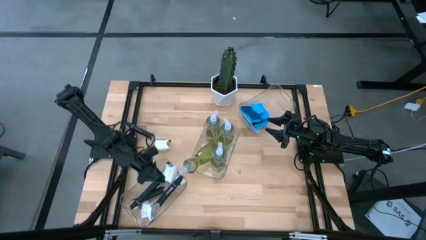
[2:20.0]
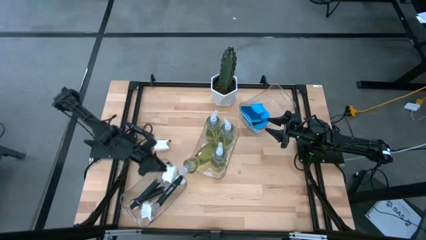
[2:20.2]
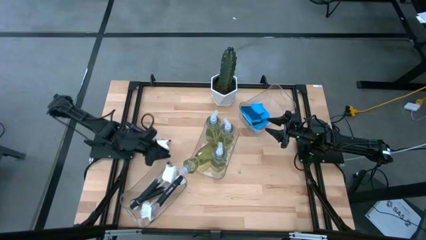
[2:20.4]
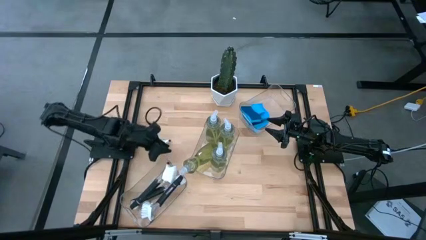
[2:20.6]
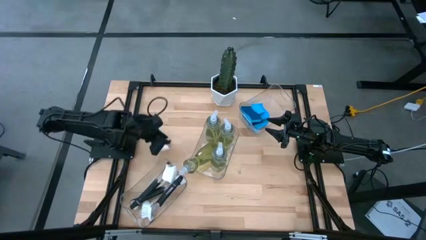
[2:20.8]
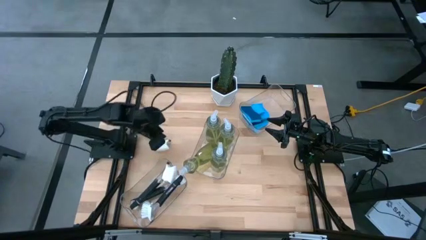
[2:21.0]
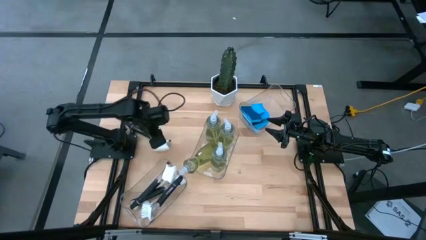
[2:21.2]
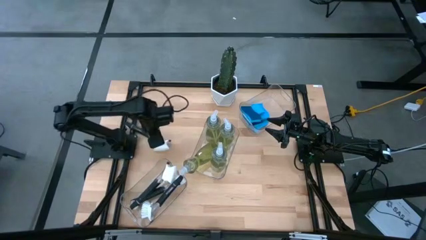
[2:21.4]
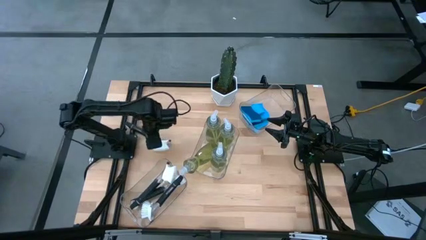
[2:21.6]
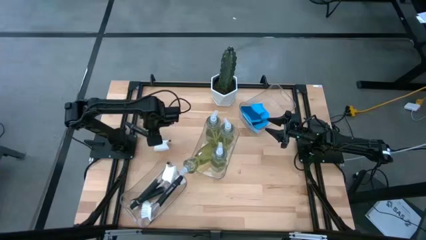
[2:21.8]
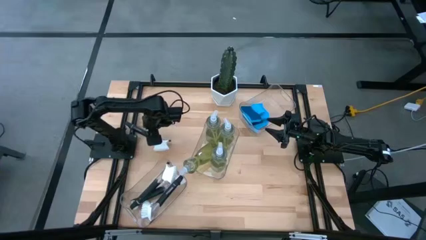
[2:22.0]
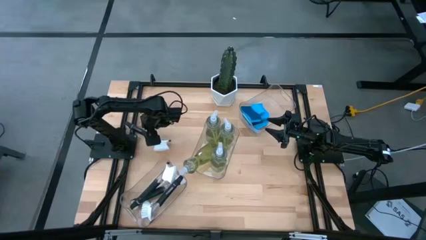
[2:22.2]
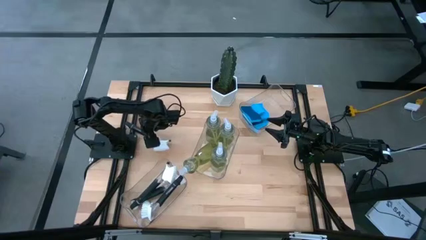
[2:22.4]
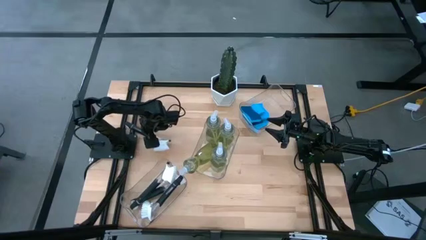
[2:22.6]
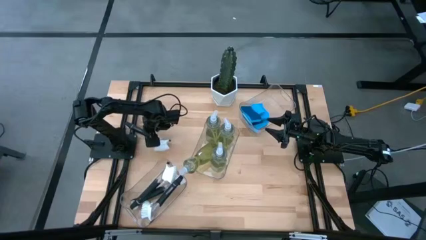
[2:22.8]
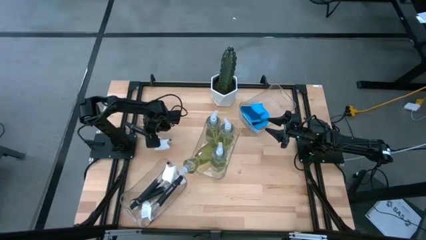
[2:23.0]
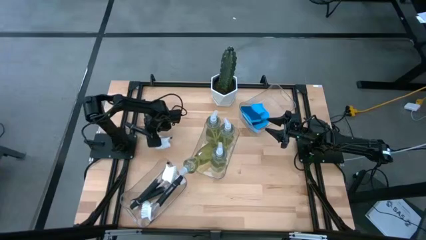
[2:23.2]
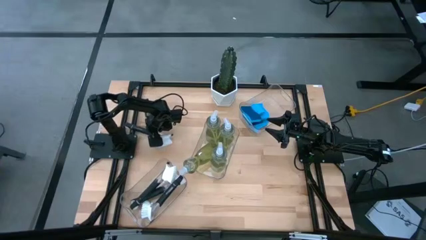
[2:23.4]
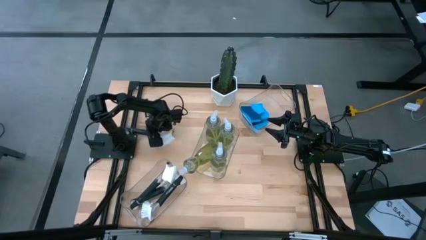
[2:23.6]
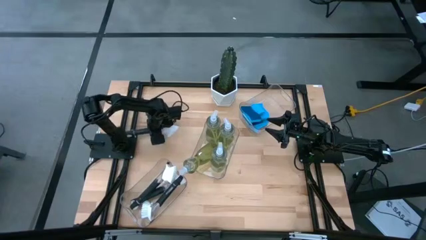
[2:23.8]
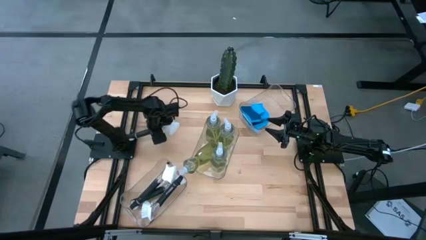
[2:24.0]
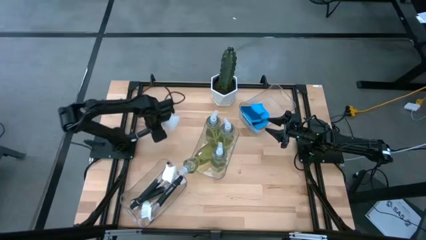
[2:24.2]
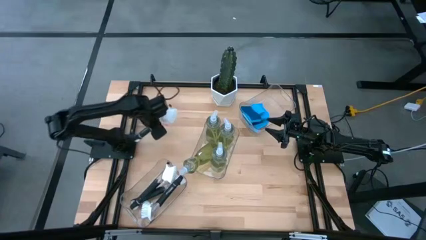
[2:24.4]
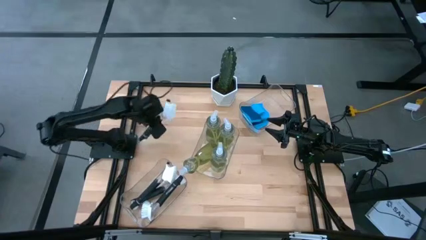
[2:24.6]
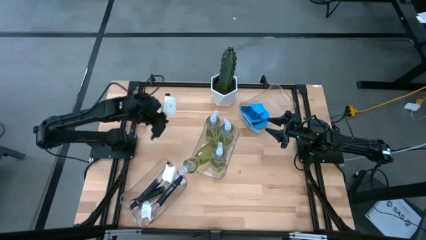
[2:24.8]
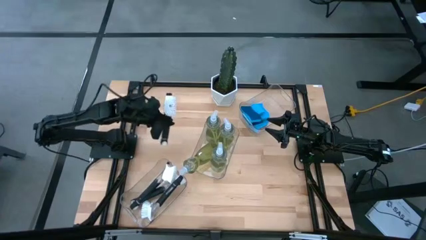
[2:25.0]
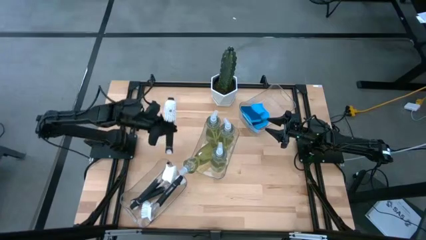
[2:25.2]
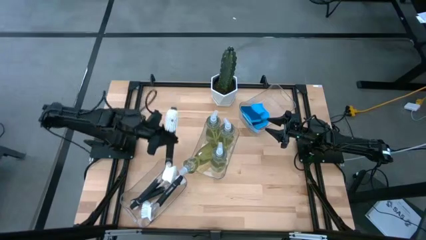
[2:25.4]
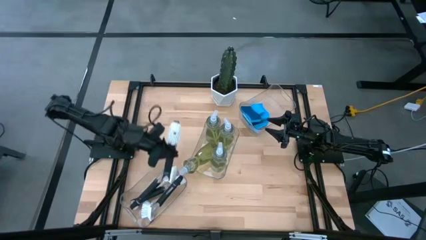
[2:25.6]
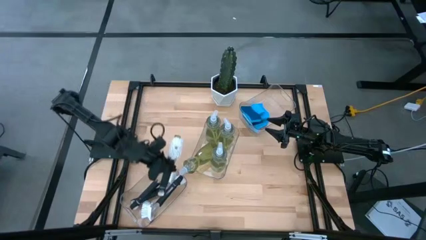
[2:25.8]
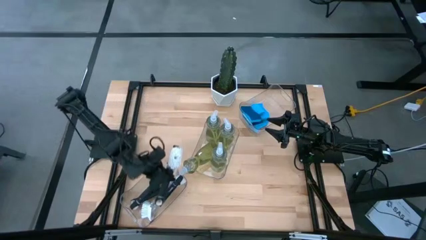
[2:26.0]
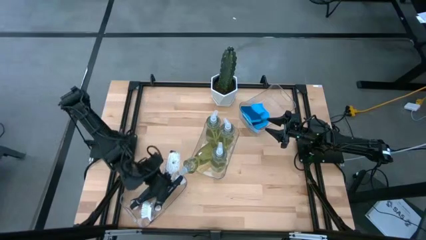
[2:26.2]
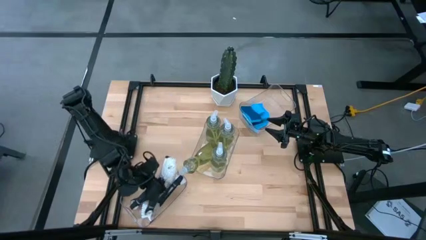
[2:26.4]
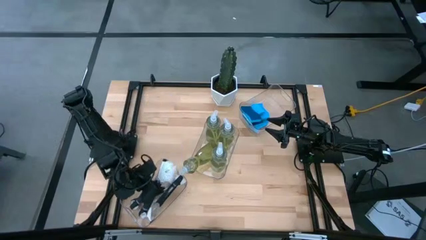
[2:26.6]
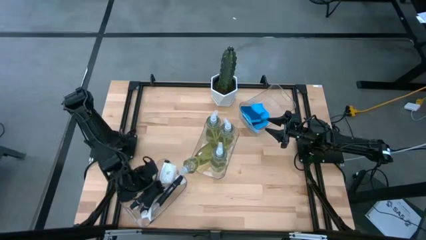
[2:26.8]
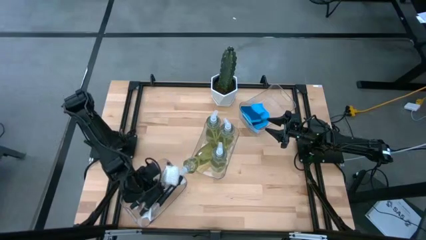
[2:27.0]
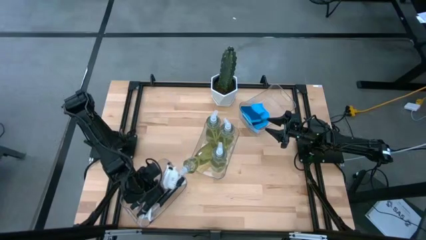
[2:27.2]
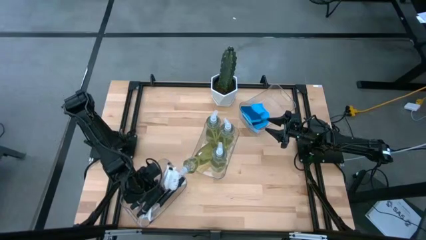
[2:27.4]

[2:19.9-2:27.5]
Task: Pick & Place Kitchen Sink Supplies
Put the black dish brush into the bottom transparent bin

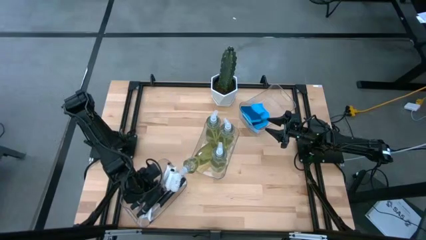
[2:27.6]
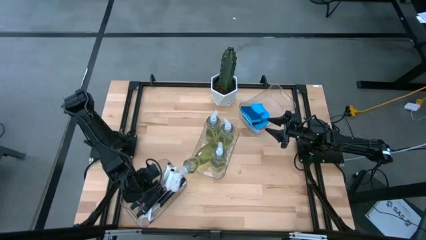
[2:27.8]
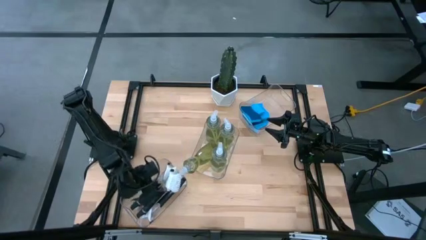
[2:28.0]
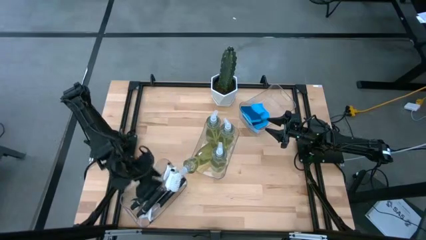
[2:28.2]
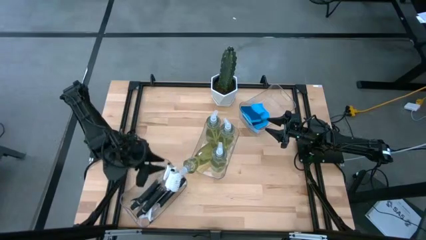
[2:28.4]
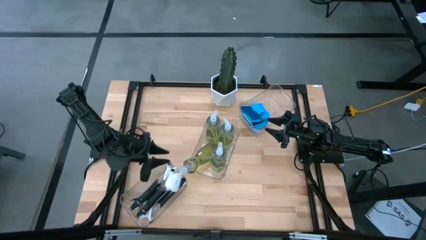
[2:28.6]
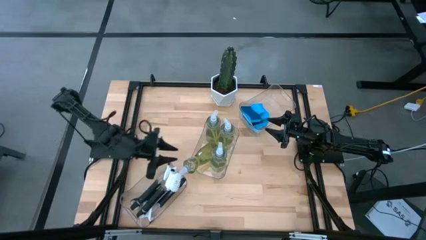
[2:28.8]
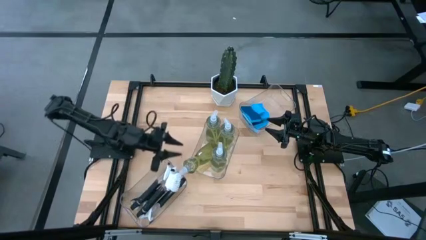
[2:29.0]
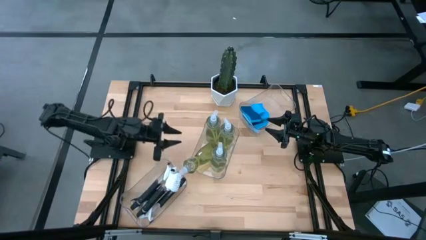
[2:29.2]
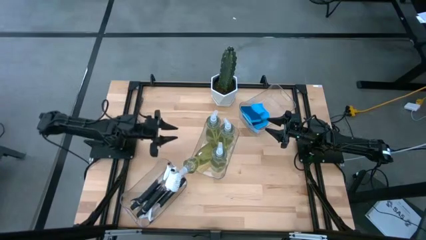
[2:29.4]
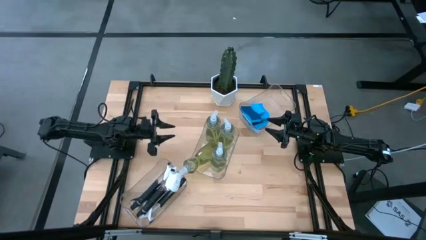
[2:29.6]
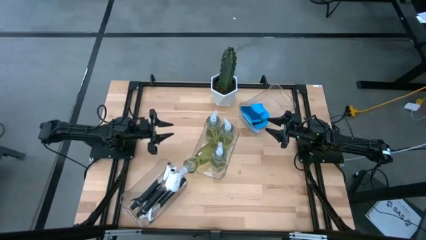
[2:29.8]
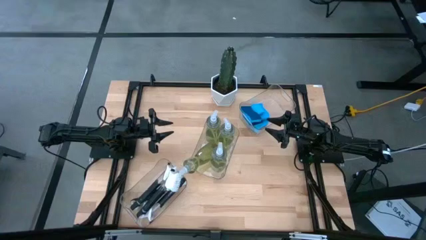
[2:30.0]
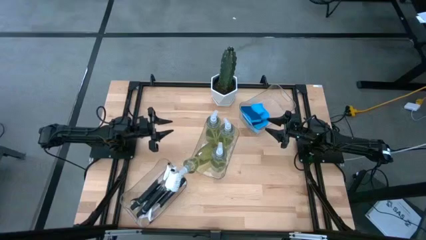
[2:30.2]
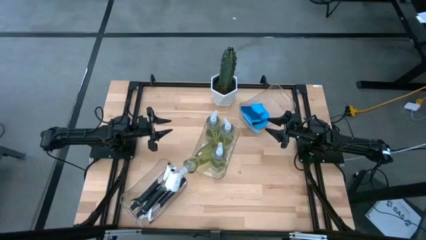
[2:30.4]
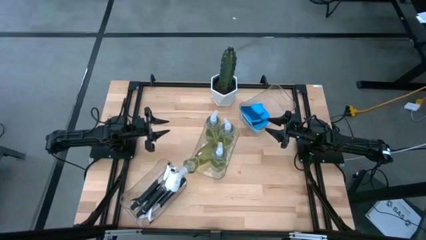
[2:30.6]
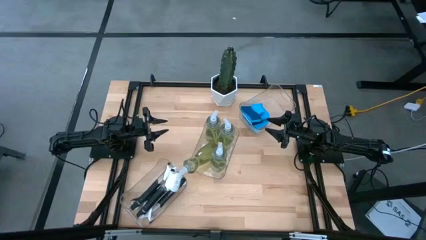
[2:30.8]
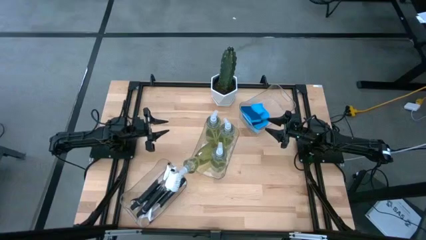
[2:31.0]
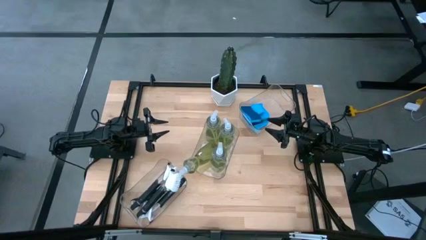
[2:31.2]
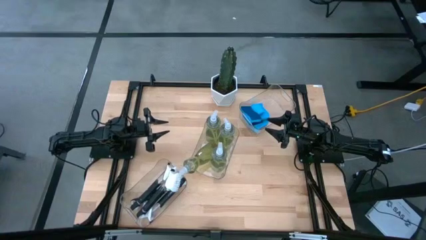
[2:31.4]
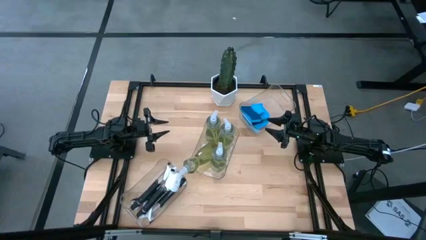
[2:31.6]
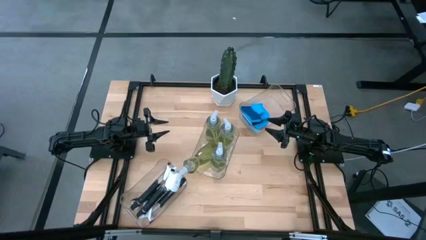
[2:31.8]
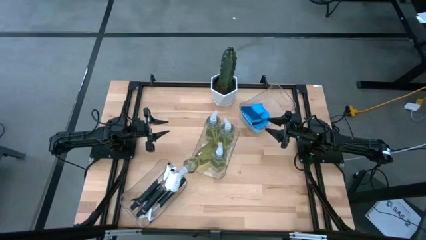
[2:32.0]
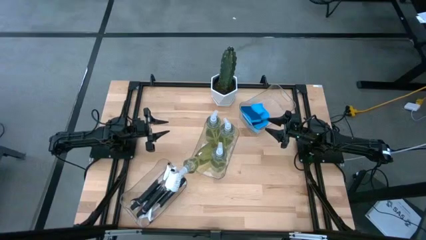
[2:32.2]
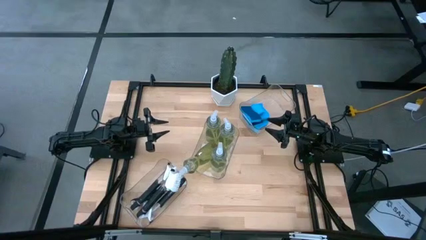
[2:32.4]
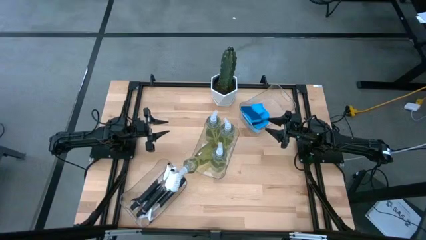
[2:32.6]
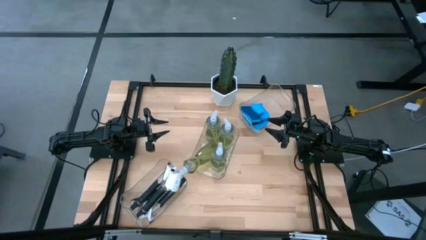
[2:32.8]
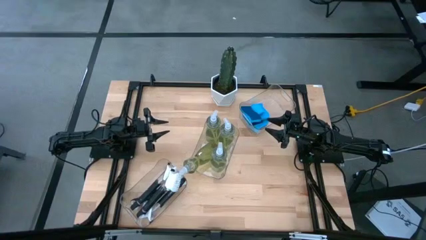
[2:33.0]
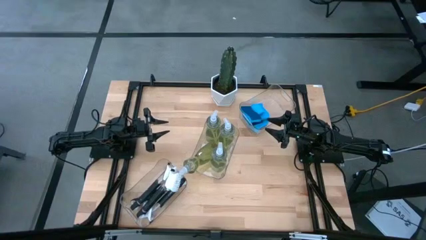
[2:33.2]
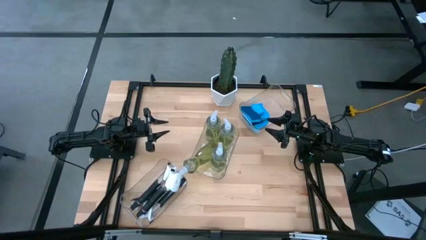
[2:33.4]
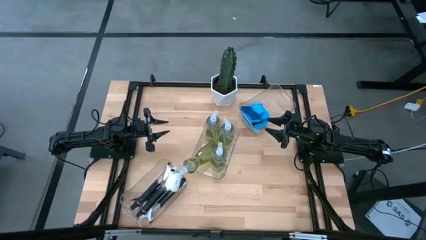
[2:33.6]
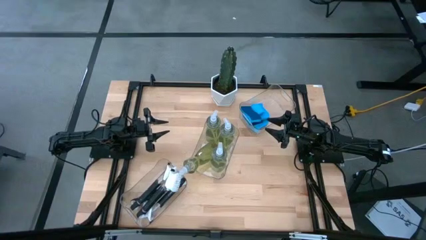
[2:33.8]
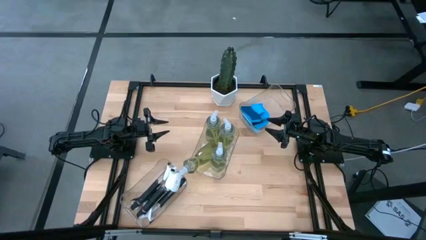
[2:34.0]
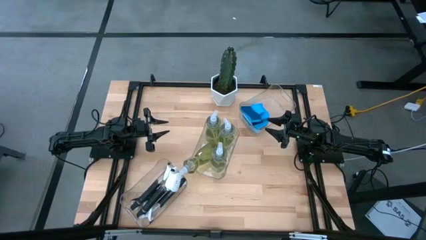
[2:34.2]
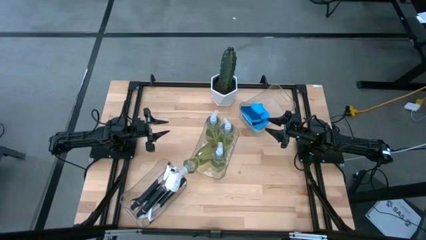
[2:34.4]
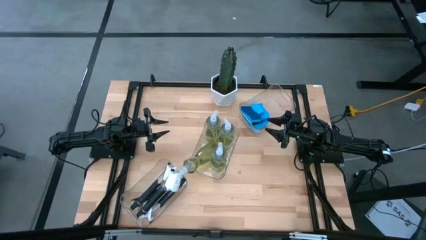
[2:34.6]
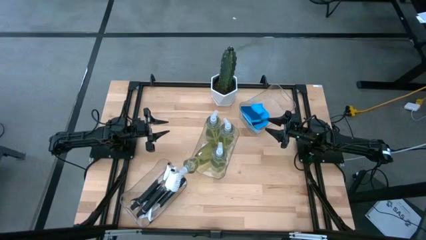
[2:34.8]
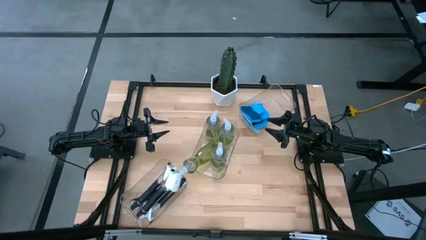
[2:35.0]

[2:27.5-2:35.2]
Return to Home Position

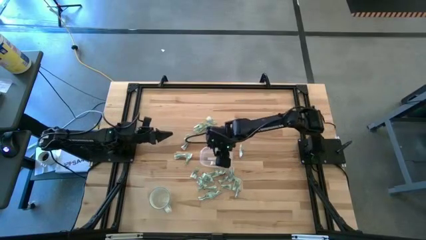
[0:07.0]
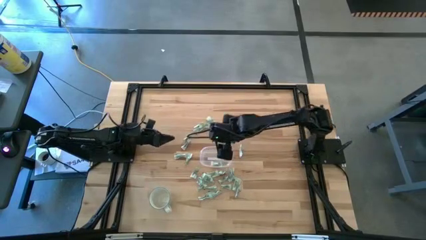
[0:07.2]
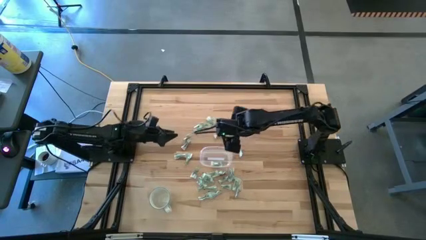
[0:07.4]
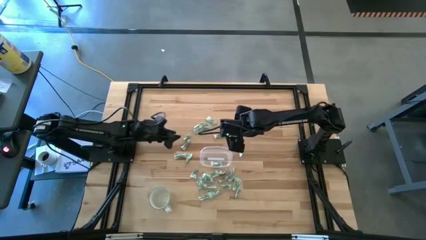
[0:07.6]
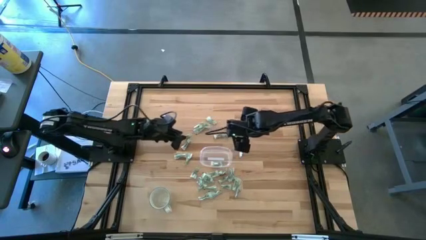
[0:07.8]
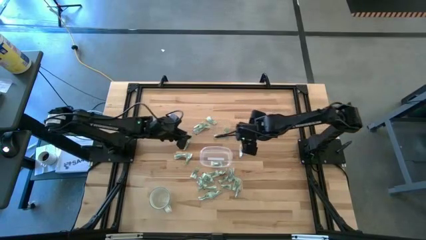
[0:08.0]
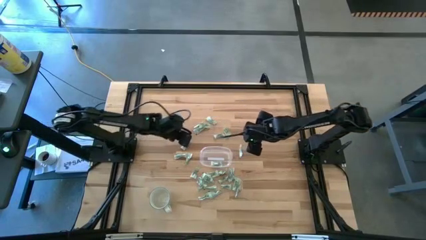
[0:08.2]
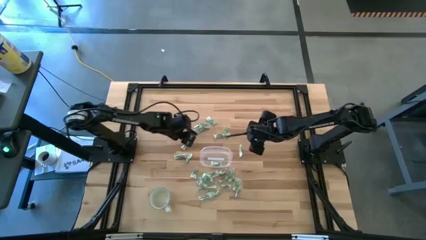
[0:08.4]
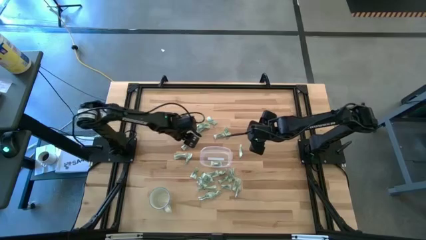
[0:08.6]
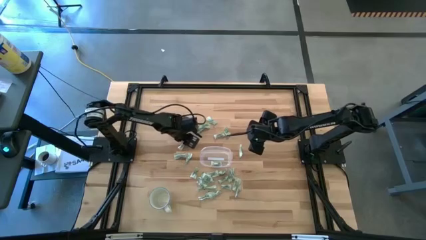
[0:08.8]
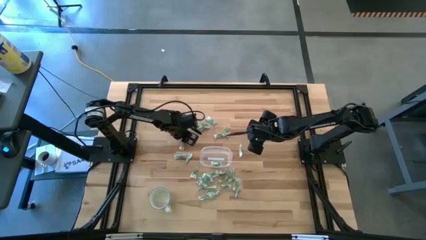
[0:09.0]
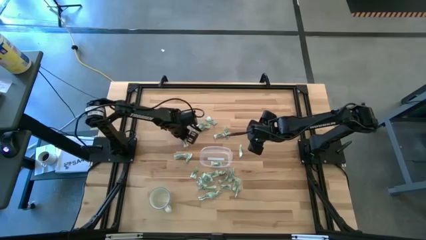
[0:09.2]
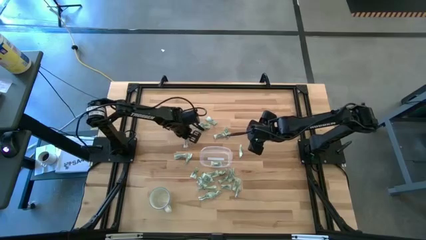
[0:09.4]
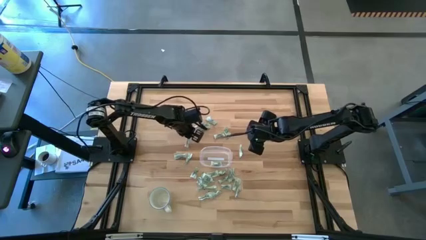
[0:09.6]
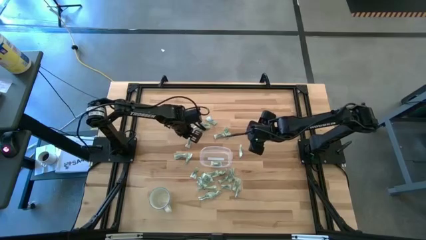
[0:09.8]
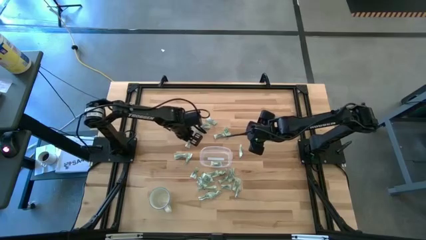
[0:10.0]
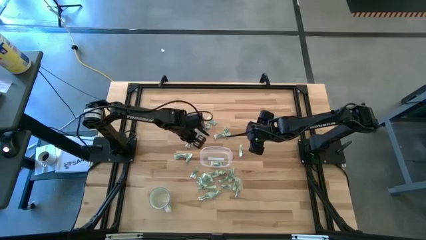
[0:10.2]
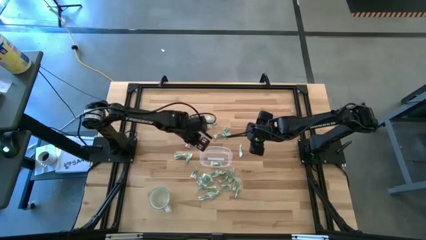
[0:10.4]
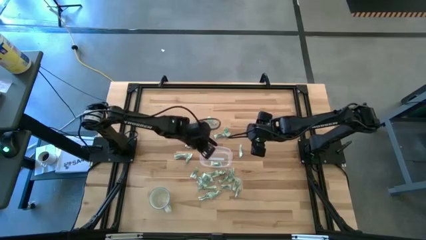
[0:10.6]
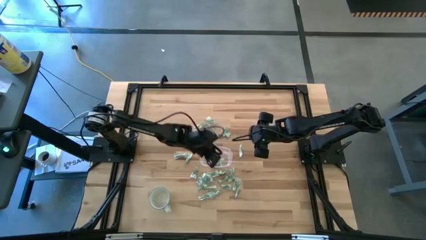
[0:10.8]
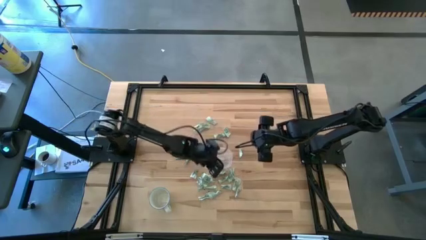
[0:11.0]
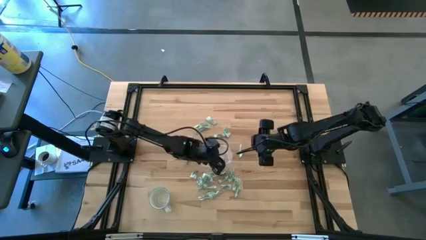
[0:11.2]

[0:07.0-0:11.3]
Task: Pick and place Stevia / Truvia into bins
Put the stevia packet into the transparent container
